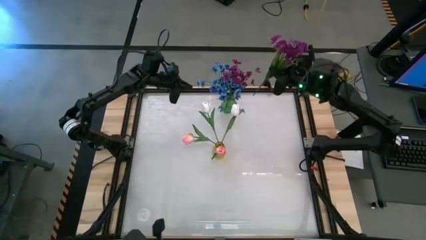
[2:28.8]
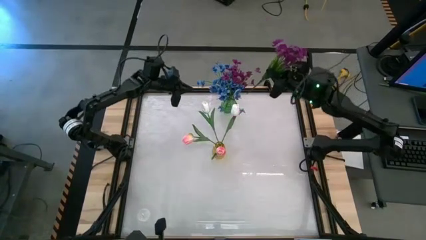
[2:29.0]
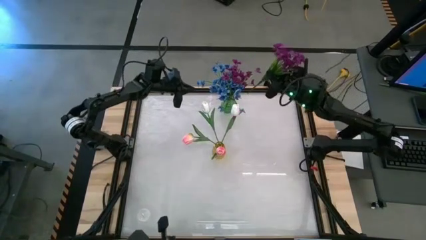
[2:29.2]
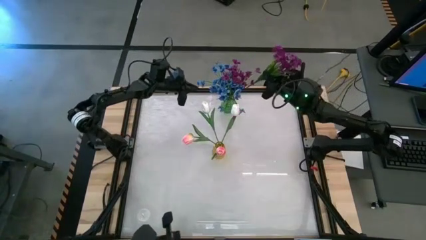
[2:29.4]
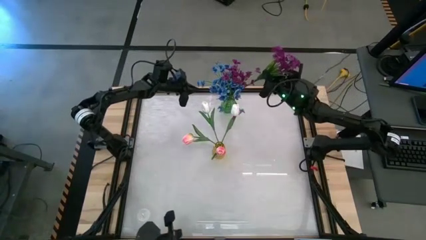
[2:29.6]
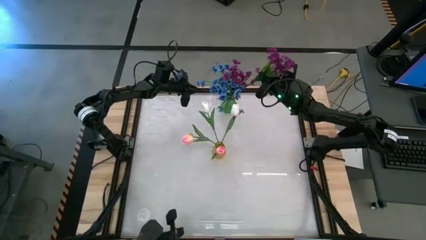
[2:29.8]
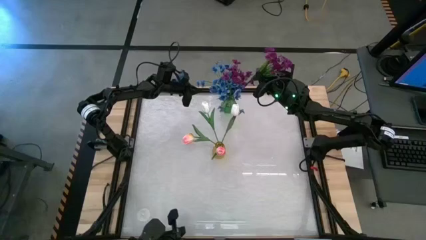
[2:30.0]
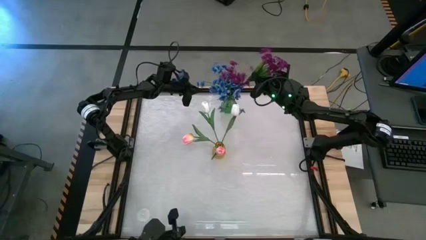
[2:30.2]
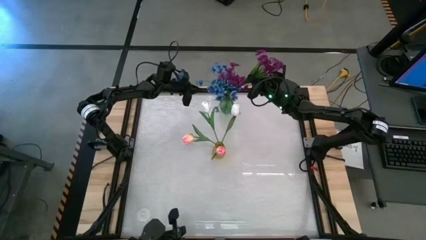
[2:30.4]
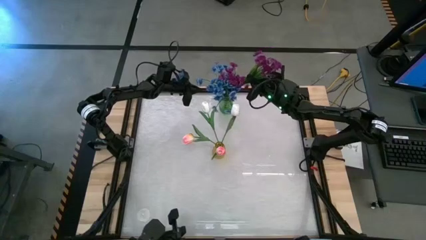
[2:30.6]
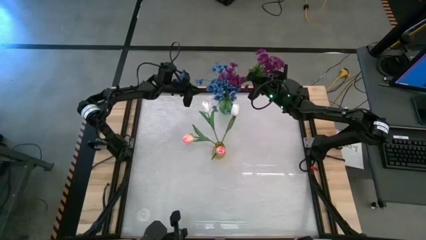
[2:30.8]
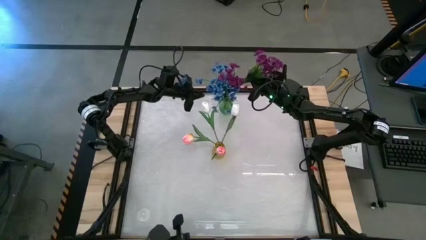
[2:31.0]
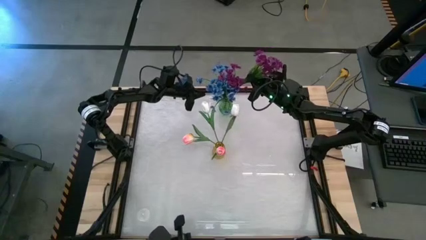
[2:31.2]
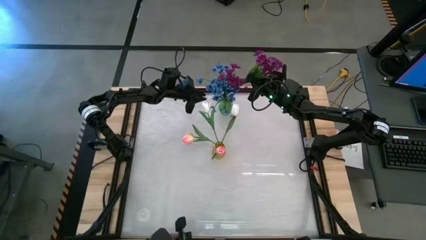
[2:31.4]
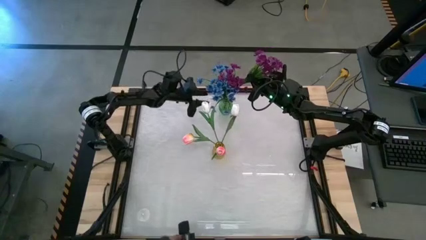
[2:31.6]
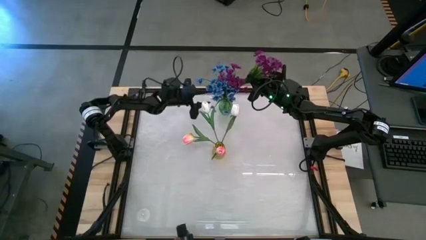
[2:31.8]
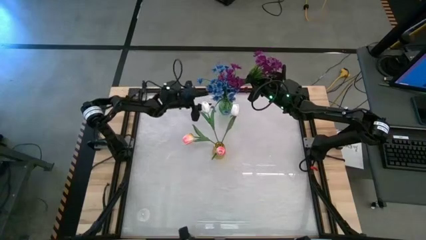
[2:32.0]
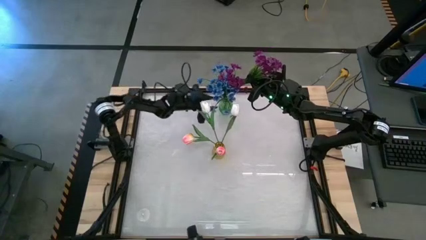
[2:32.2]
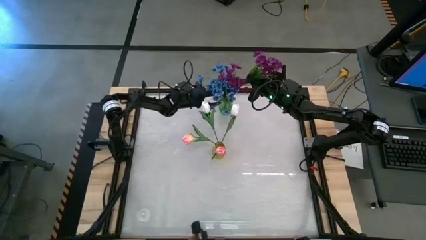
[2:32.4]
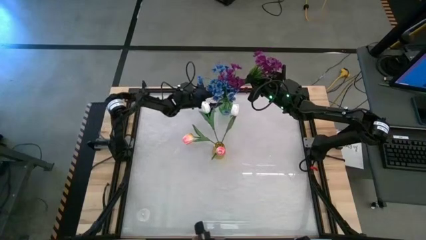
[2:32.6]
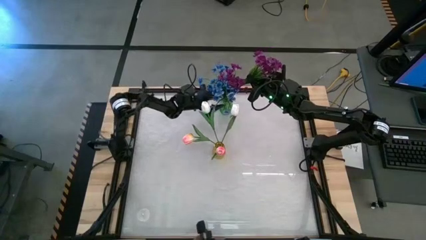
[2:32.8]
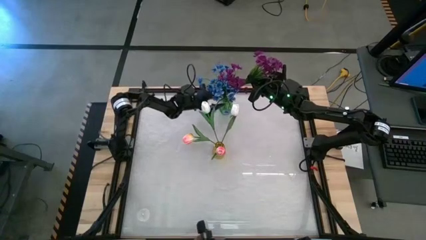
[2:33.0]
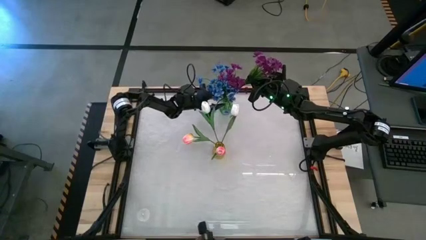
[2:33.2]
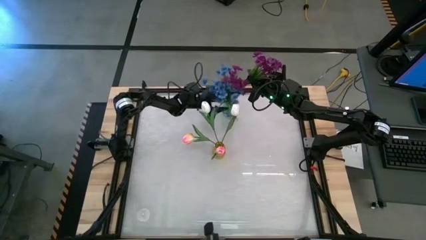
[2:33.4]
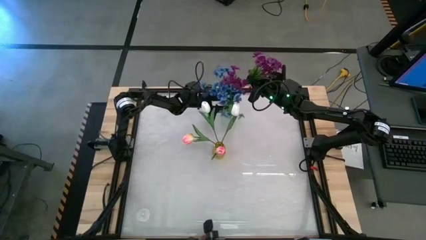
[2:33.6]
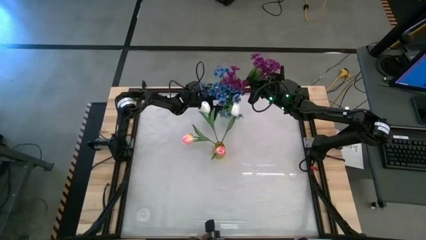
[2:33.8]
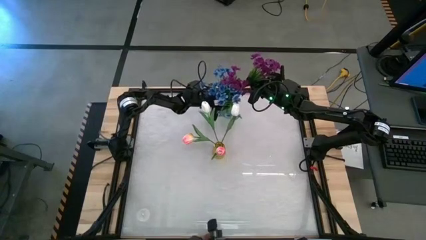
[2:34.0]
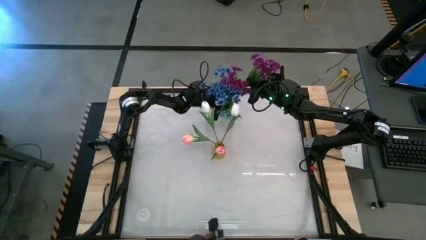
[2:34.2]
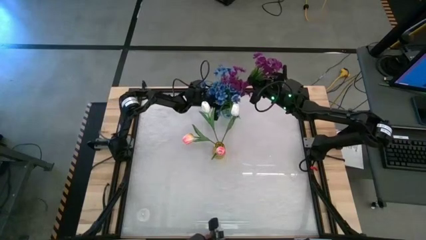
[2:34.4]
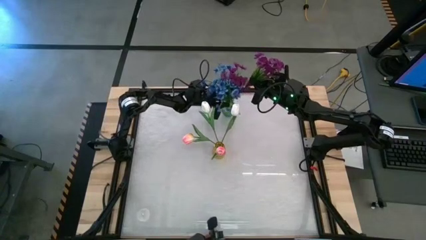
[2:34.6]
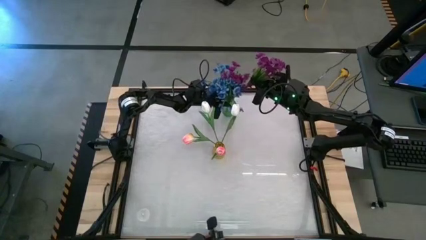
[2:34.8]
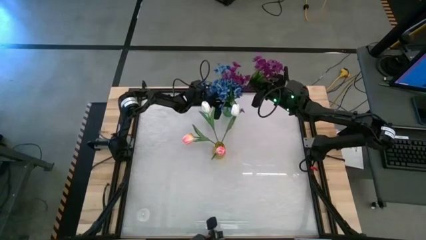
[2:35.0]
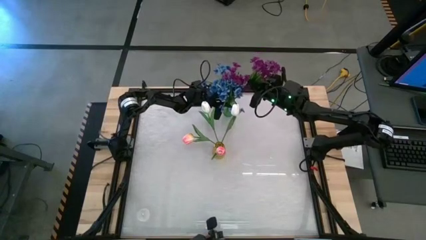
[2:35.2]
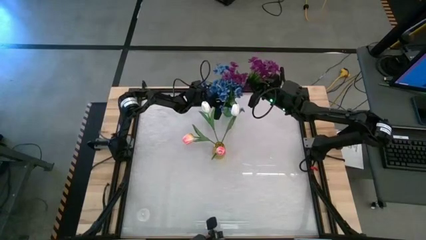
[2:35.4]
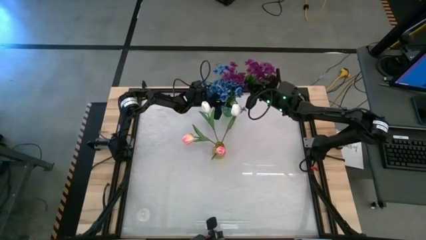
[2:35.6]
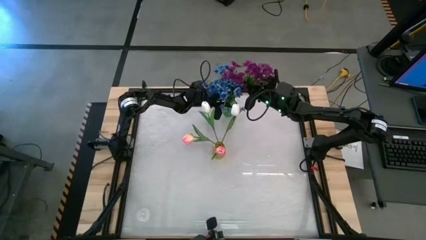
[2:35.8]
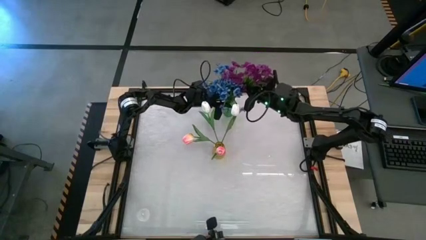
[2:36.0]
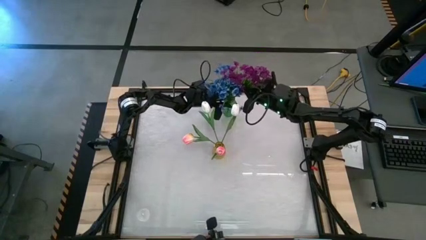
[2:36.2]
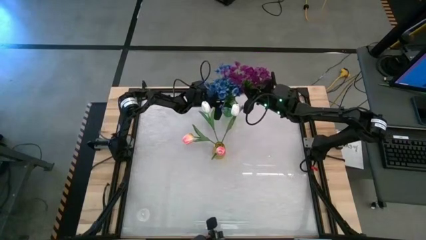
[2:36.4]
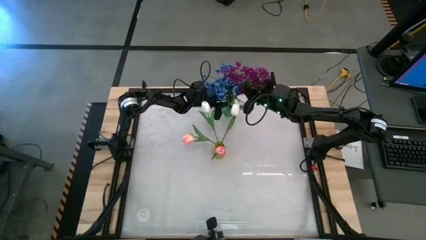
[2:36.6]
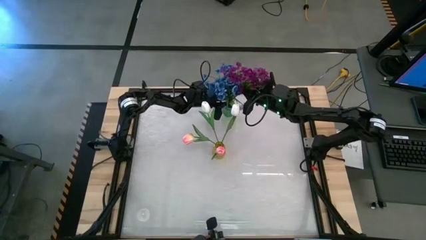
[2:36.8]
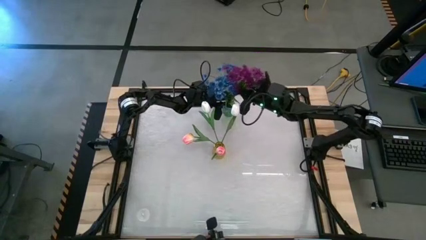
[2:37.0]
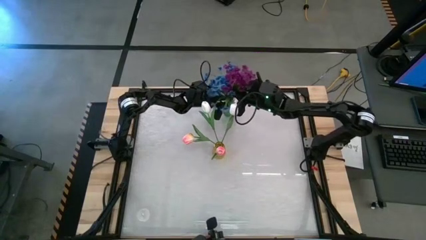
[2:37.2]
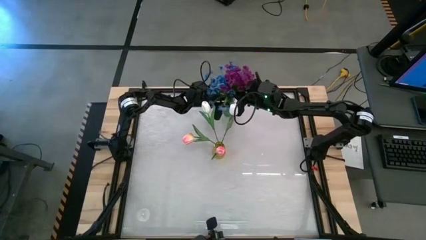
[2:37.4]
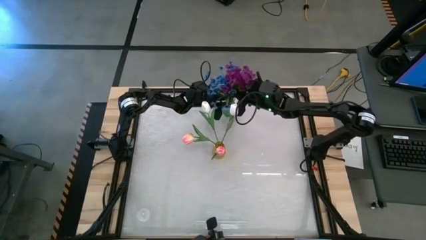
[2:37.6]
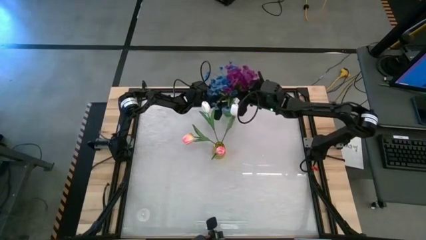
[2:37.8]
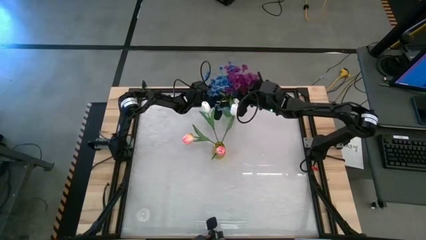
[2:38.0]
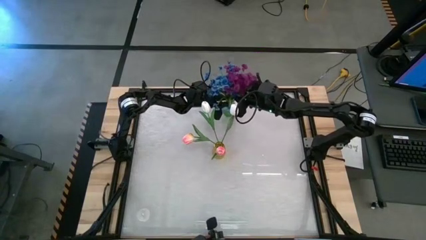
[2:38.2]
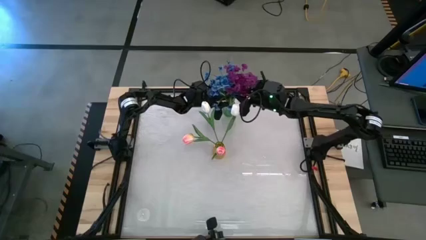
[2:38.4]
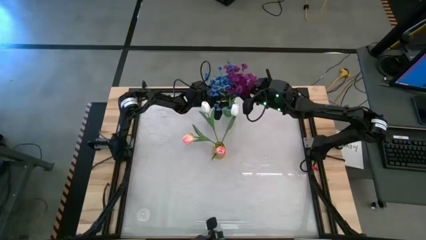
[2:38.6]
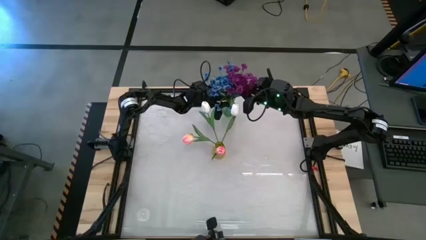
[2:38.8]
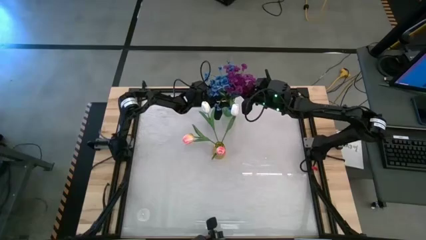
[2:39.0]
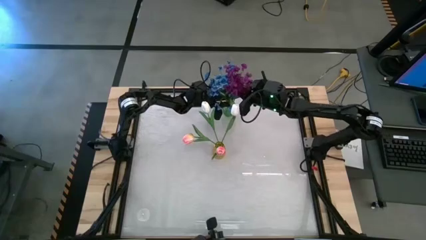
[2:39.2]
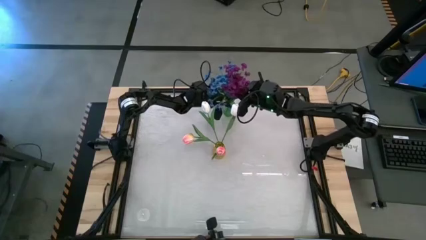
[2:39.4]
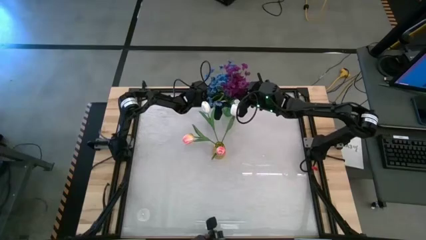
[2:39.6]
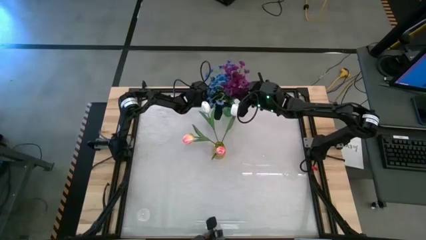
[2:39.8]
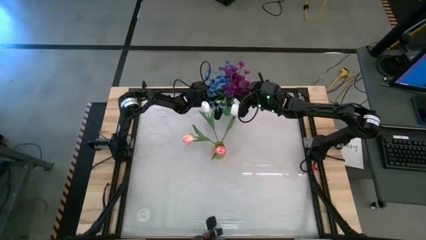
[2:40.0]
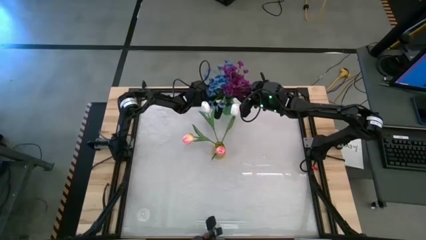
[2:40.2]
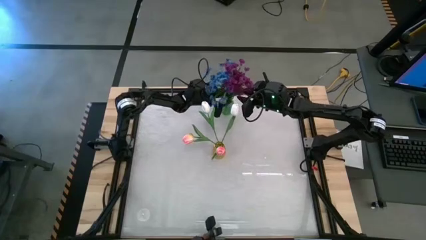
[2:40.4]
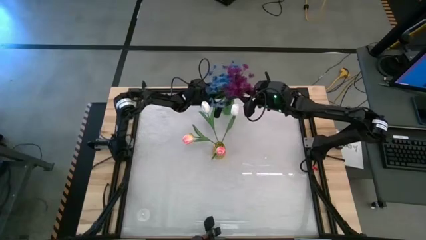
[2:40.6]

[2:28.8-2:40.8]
Task: Sort flowers into vase by color
Put the purple flowers into the green vase

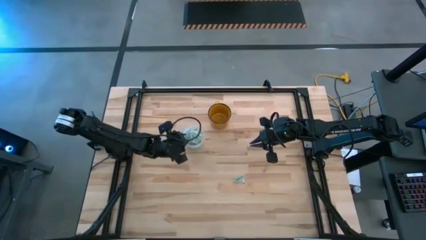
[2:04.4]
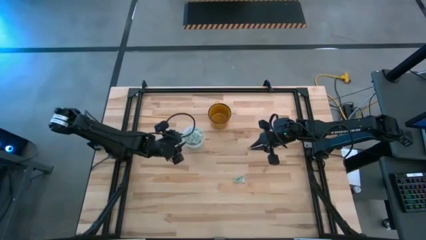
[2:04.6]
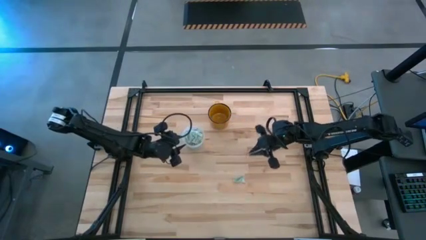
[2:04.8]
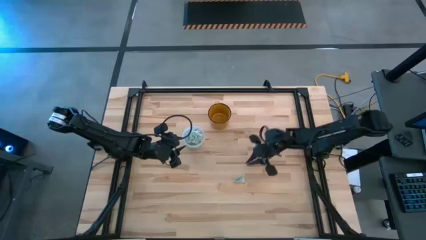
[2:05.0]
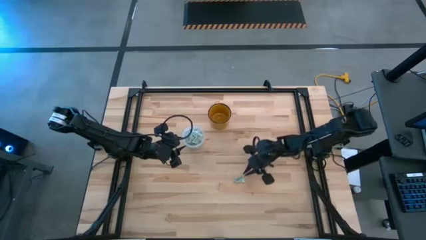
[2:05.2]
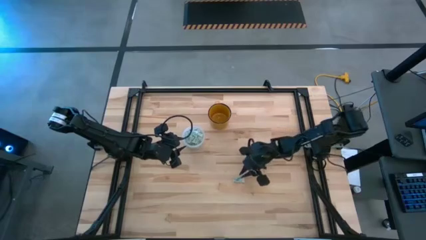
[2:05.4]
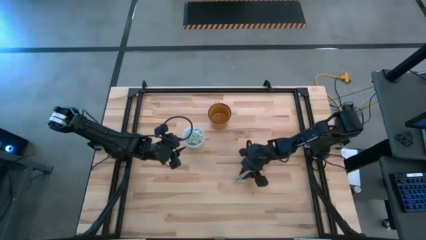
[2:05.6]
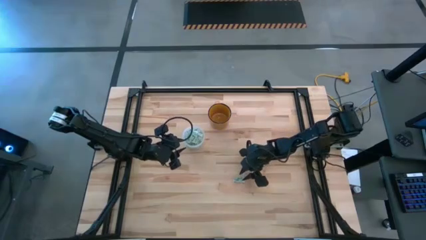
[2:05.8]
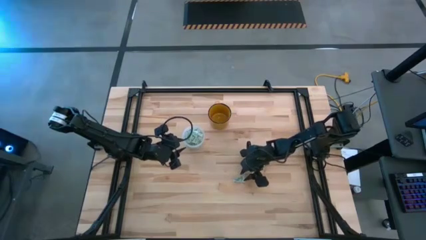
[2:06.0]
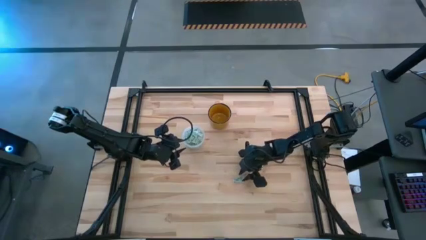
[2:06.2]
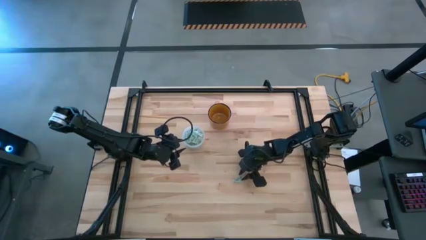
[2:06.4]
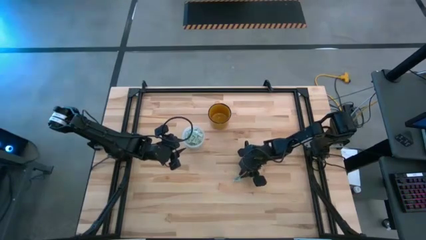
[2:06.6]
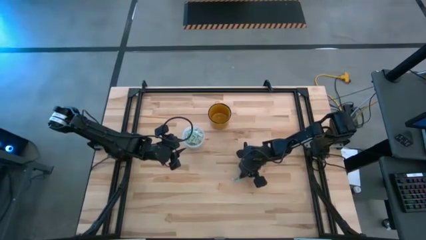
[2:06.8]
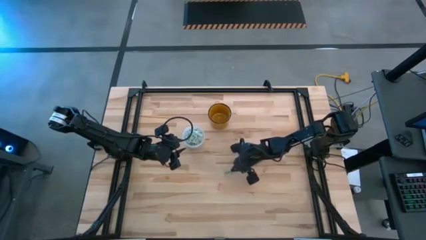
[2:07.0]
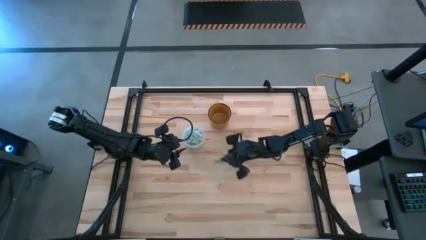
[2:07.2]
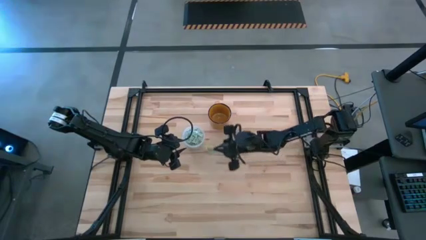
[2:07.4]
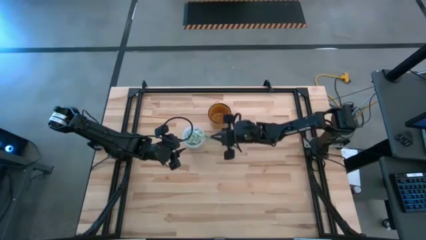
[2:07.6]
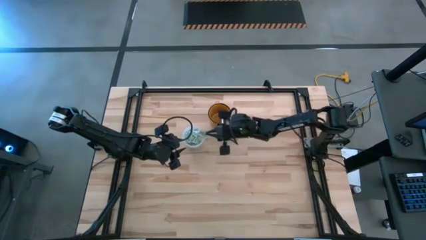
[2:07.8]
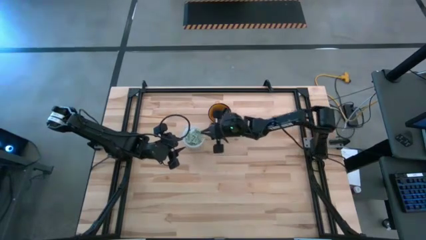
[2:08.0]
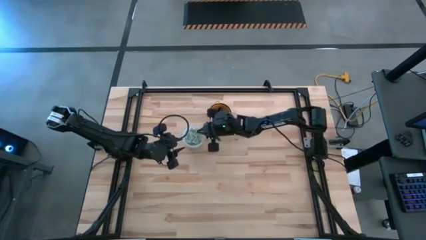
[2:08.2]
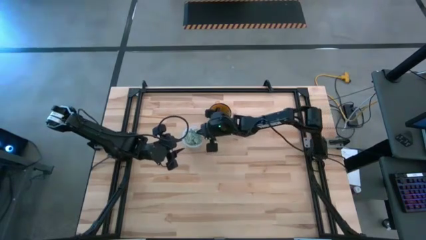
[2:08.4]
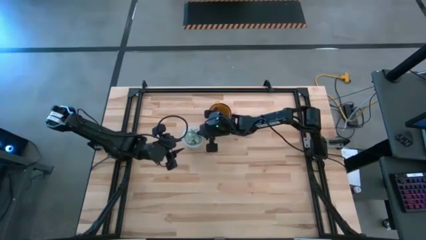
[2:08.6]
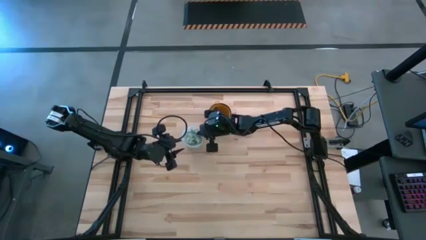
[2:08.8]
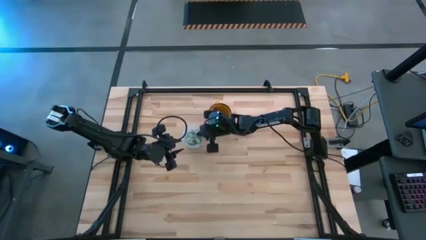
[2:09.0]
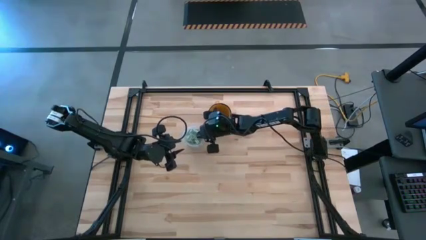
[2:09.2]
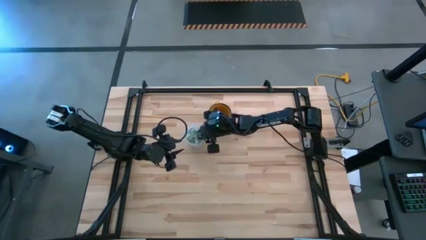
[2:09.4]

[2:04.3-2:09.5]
Task: Pick and place Stevia / Truvia into bins
Put the stevia packet into the transparent bin
